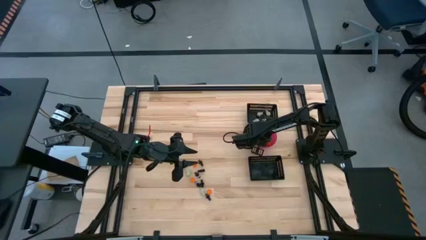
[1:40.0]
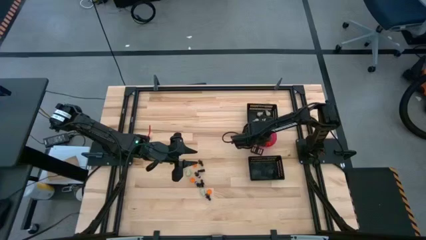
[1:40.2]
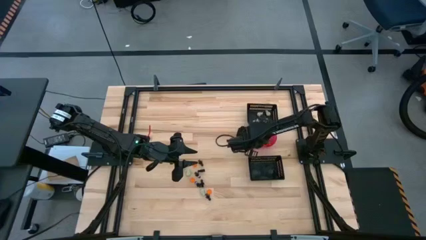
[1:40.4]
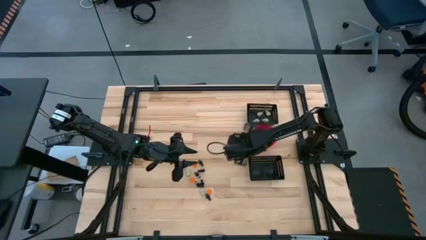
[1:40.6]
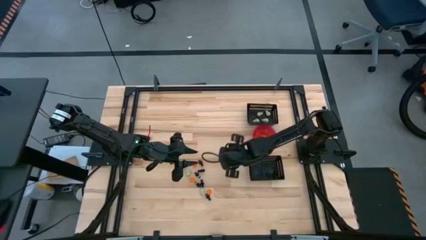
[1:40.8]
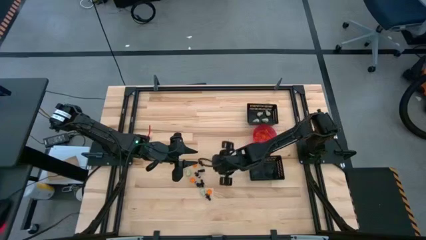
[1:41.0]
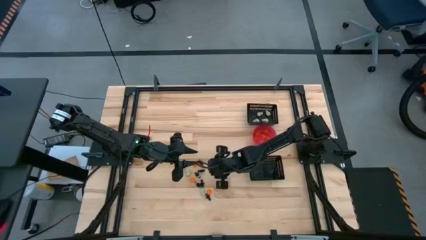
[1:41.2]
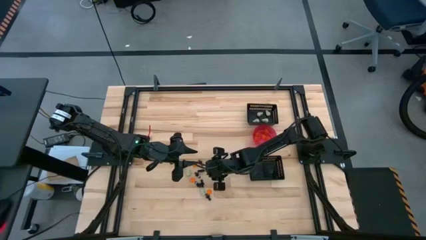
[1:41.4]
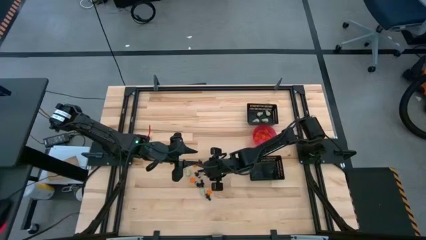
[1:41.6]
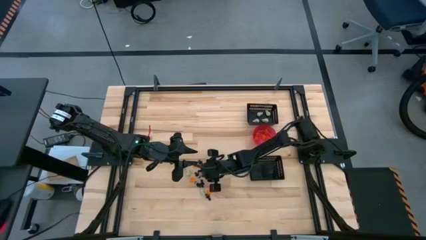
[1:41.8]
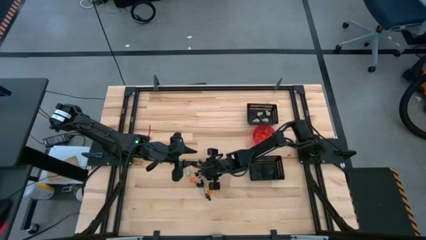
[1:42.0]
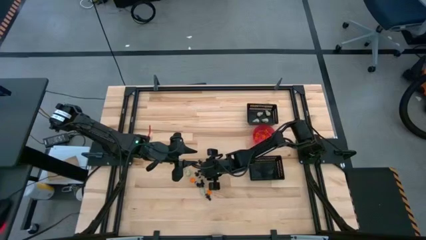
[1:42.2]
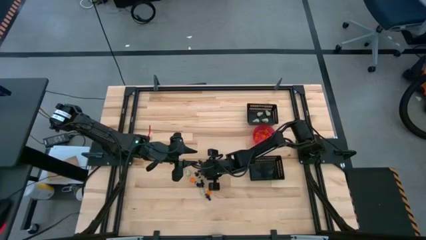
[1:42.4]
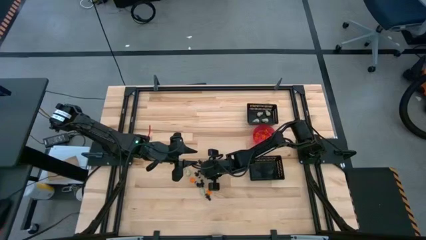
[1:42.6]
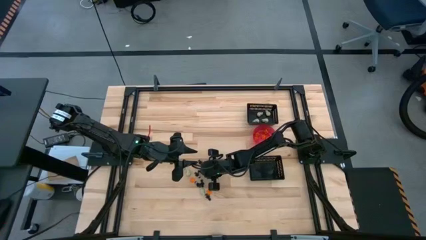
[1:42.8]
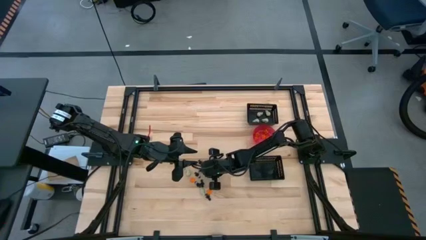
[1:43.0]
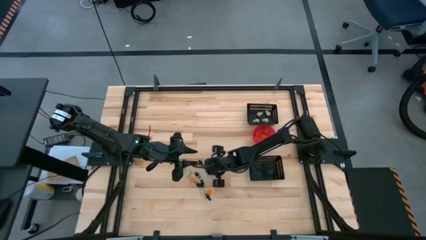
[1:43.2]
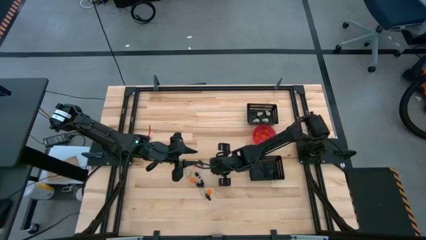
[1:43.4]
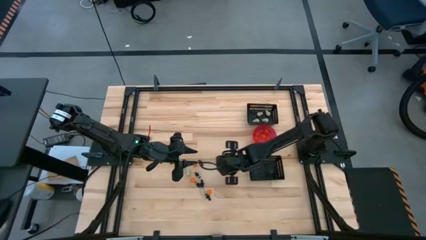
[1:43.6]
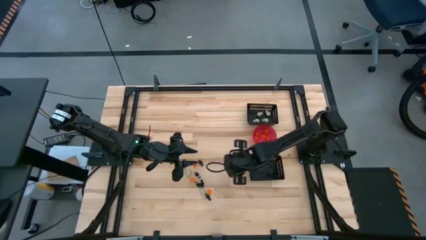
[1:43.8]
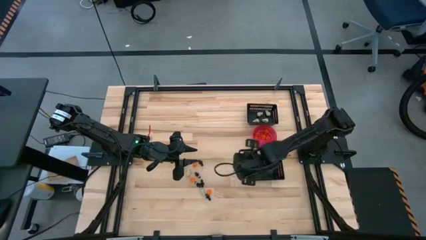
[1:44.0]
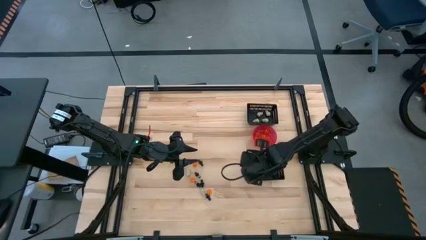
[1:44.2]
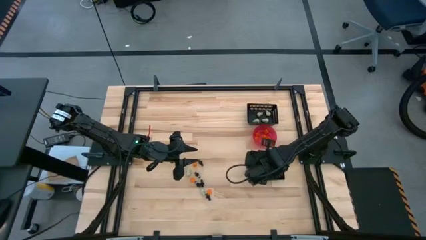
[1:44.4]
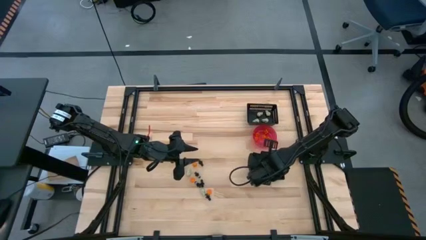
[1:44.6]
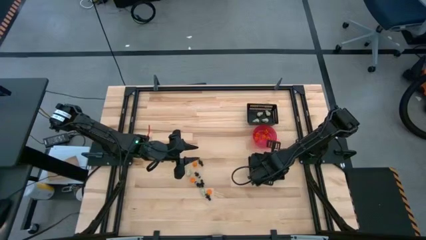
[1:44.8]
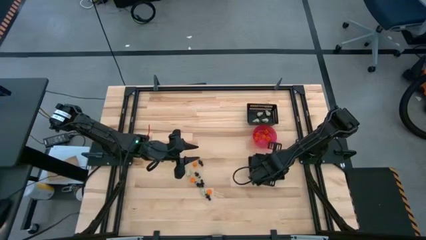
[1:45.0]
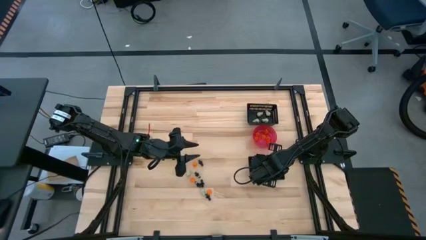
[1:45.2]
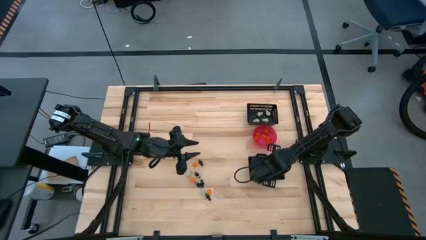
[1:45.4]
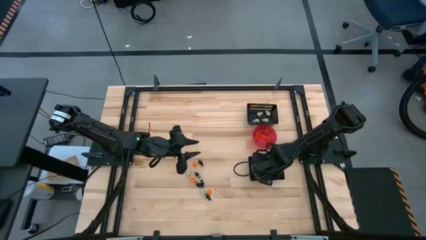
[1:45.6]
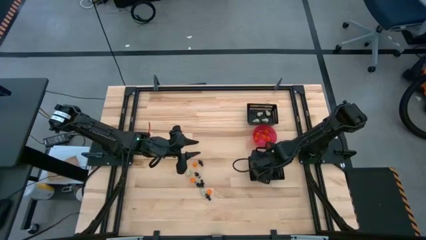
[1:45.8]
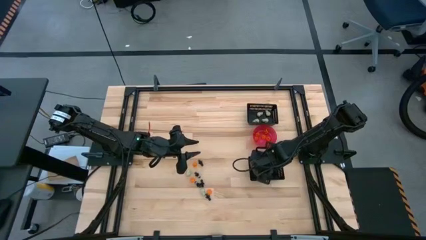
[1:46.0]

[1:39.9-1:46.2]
Task: Sort Halloween decoration
Put the black skeleton toy into the bottom black bin

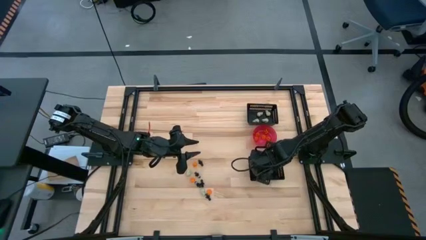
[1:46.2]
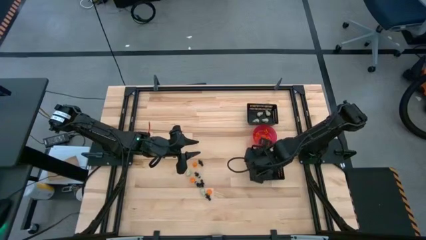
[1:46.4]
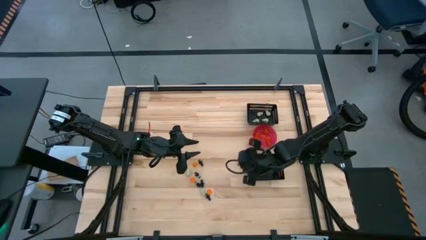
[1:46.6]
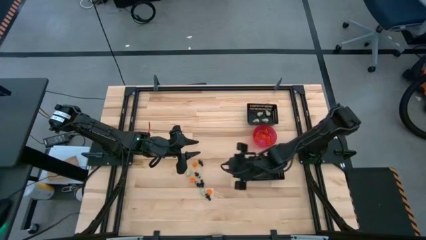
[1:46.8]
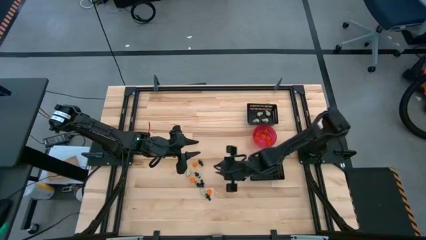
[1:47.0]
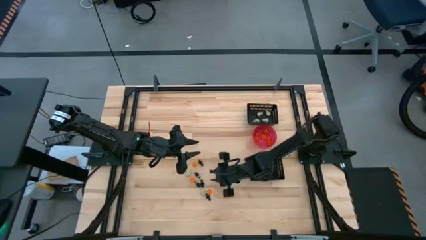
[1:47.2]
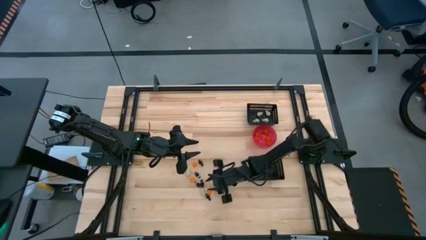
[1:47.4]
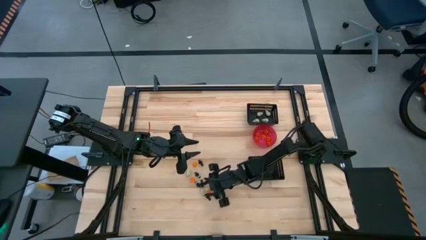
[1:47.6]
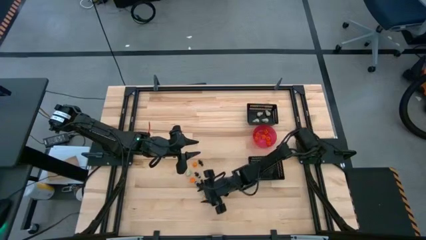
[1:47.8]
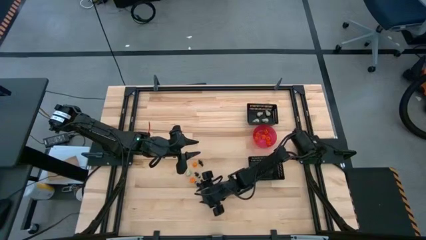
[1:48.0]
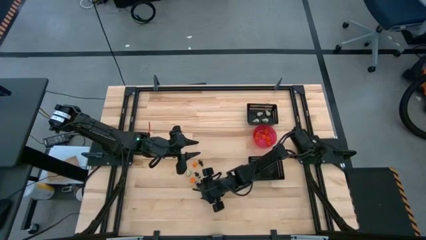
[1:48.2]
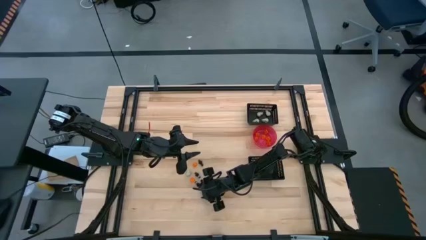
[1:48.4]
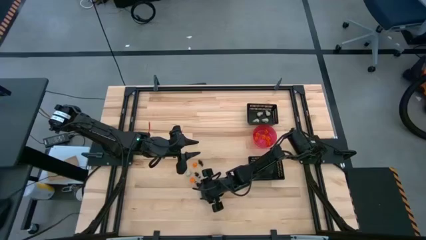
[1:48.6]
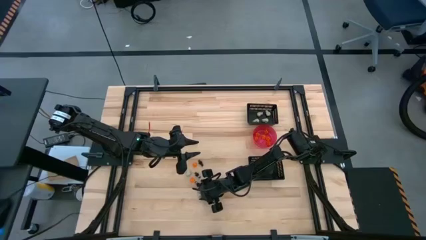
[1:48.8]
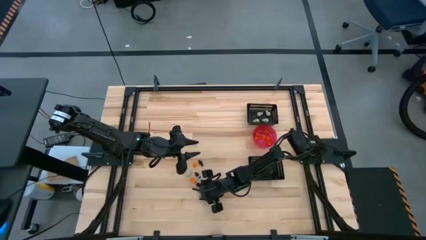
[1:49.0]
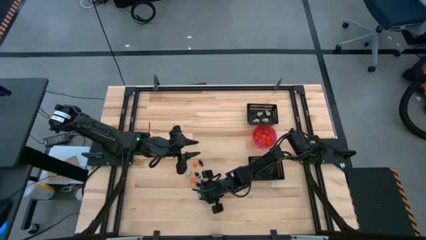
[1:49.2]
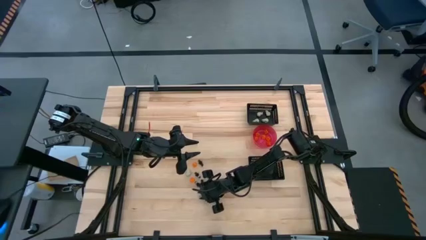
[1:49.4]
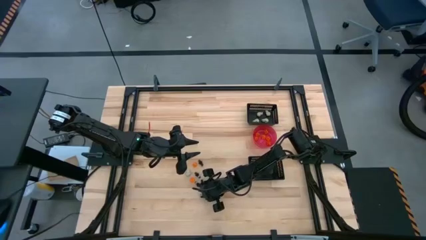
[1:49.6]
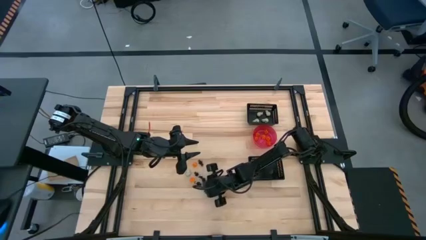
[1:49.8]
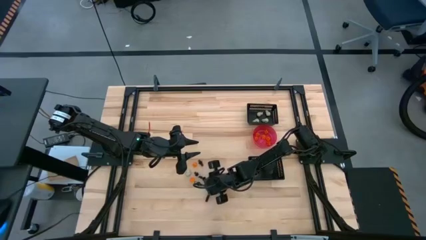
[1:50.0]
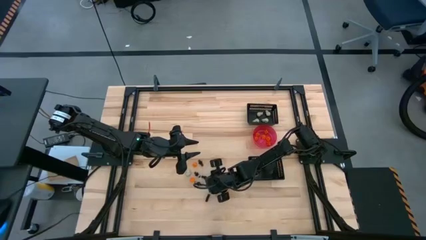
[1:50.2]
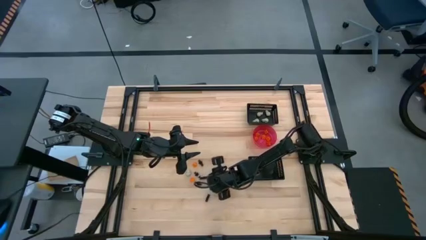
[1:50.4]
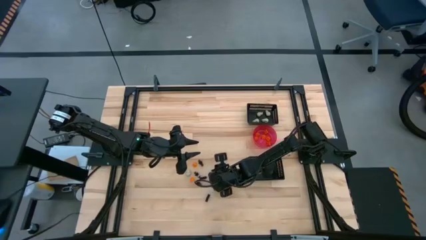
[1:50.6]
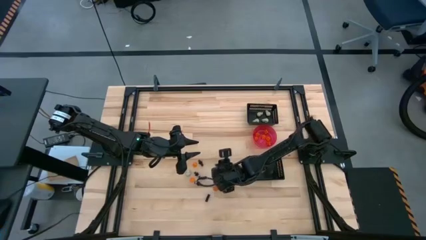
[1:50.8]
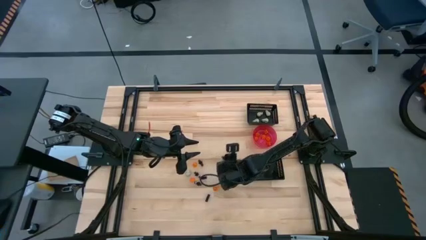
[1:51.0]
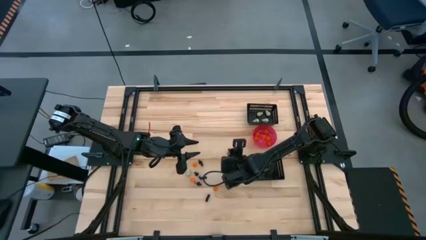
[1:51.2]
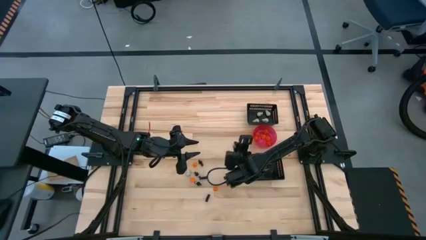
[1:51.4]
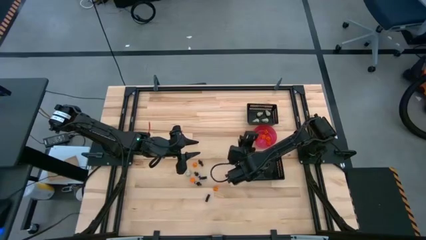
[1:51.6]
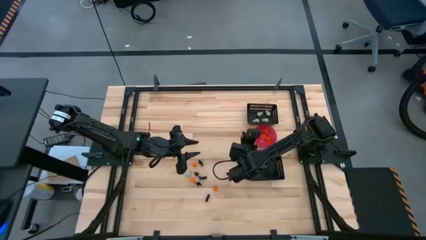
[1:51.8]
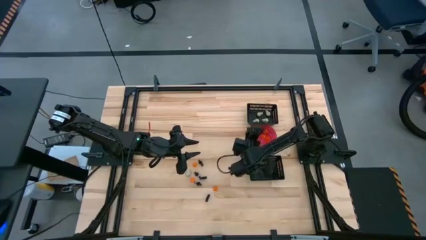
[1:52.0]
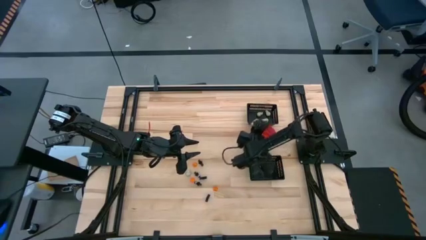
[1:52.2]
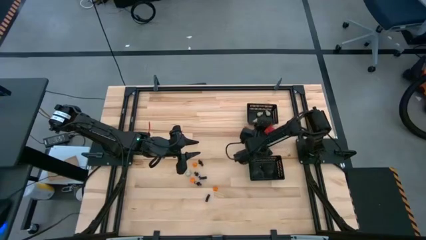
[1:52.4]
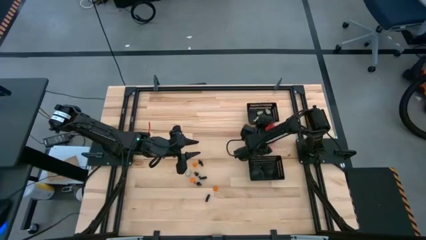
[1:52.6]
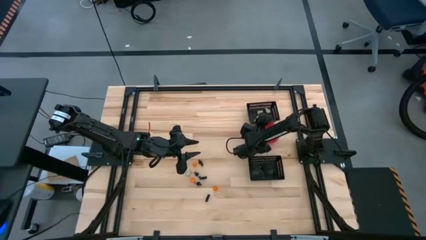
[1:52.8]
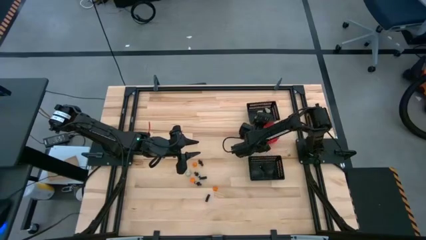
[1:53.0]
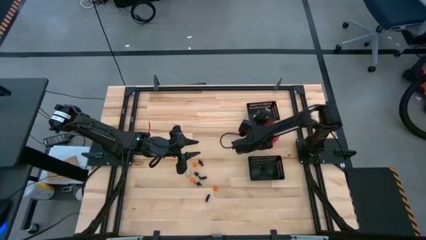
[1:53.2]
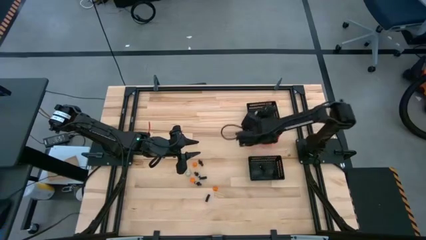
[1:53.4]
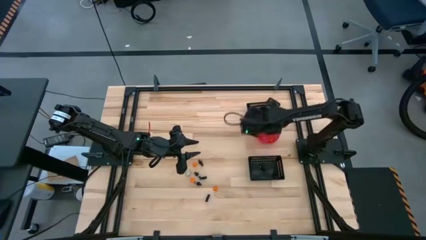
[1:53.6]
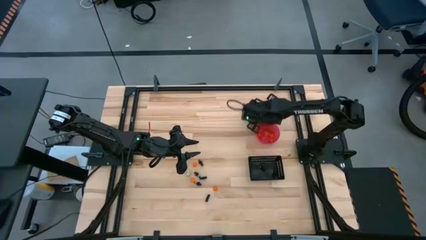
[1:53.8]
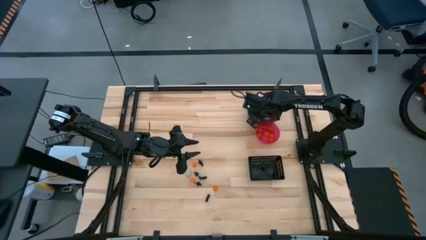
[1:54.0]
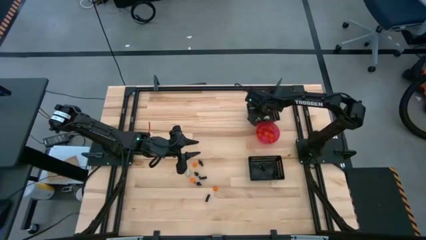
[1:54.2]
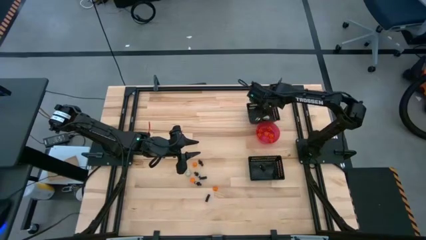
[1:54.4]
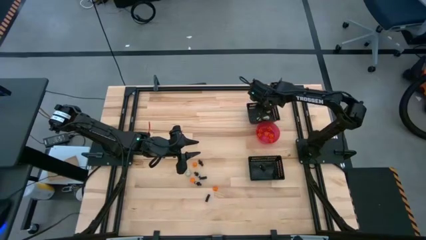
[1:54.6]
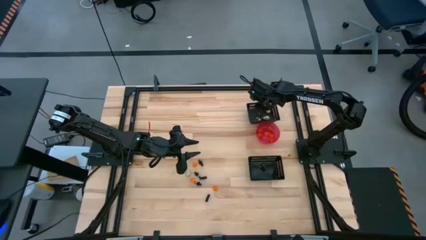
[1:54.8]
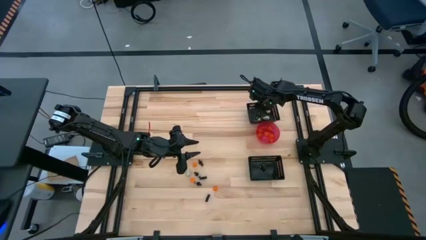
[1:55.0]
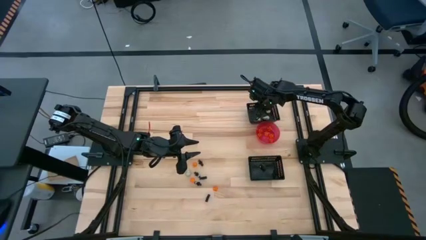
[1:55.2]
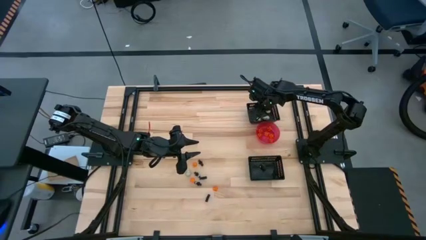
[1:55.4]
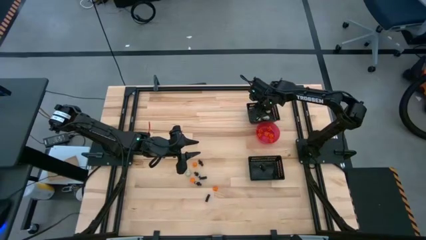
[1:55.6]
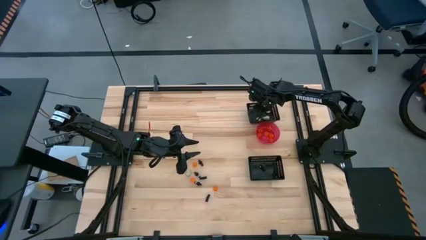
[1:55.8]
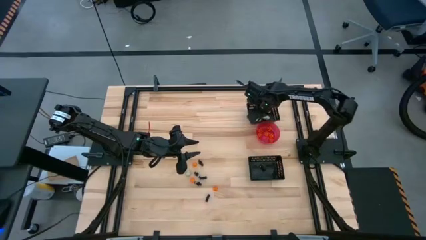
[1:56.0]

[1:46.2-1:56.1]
Put the white skull toy into the top black bin
